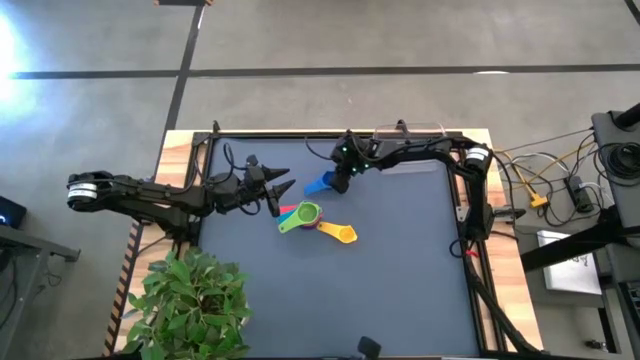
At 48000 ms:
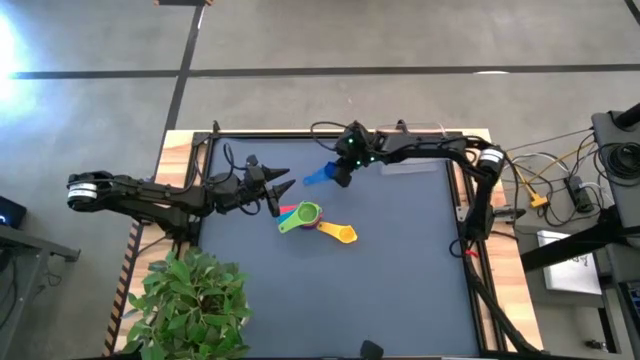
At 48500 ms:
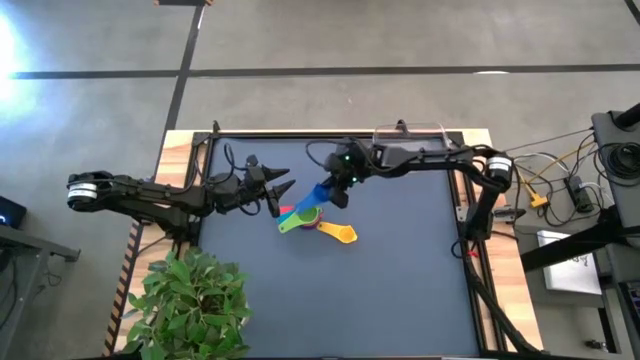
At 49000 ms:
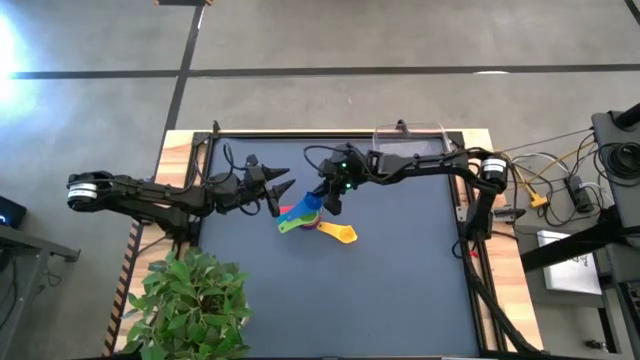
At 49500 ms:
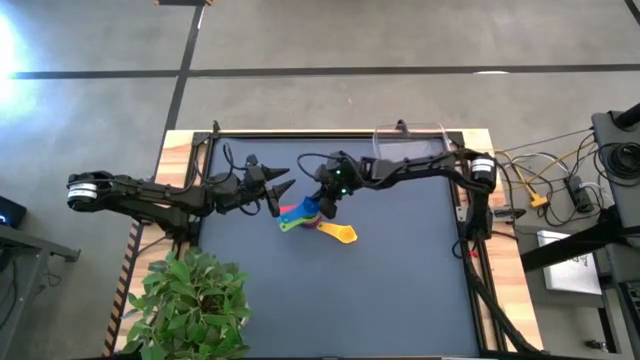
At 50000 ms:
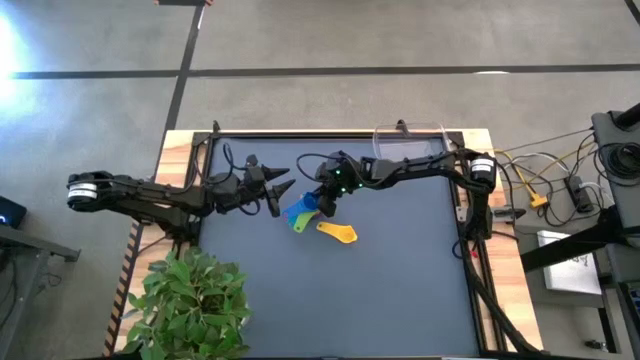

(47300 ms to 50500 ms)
Task: Nest measuring cups in basket
Stack the blue measuring cup on top of the green measuring cup

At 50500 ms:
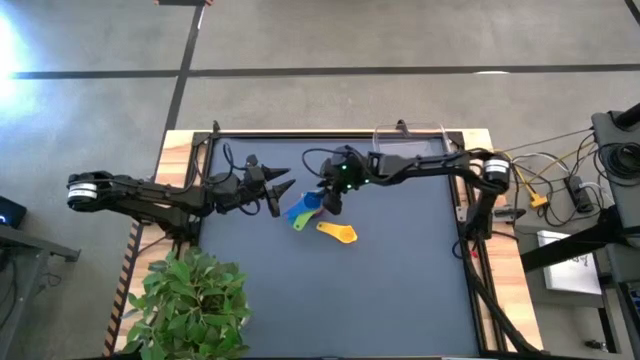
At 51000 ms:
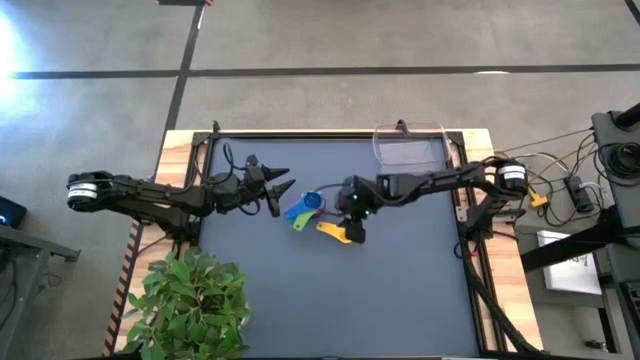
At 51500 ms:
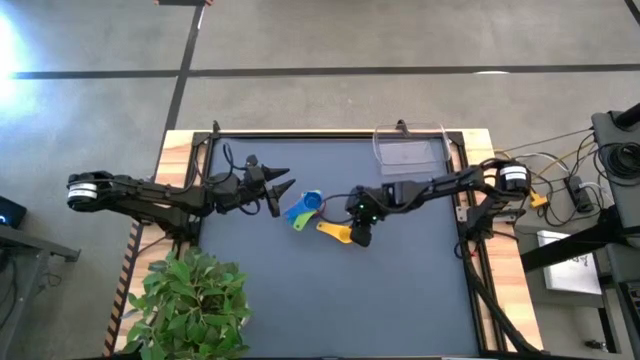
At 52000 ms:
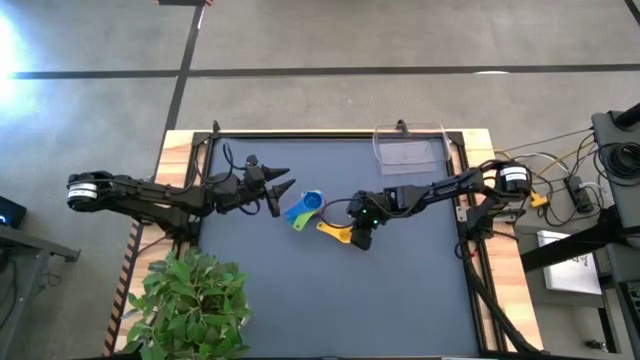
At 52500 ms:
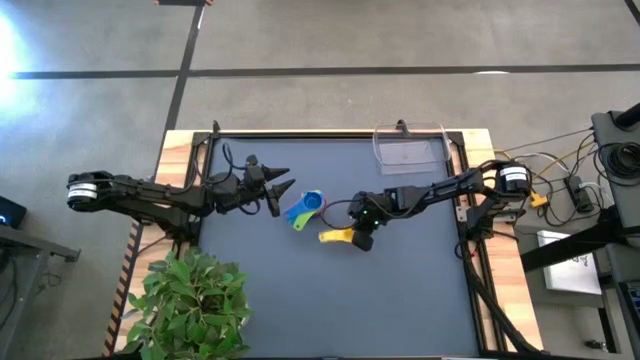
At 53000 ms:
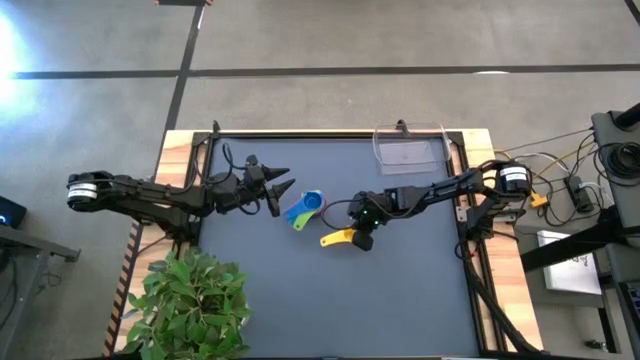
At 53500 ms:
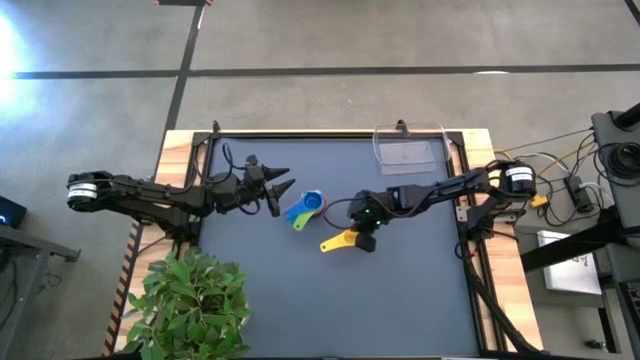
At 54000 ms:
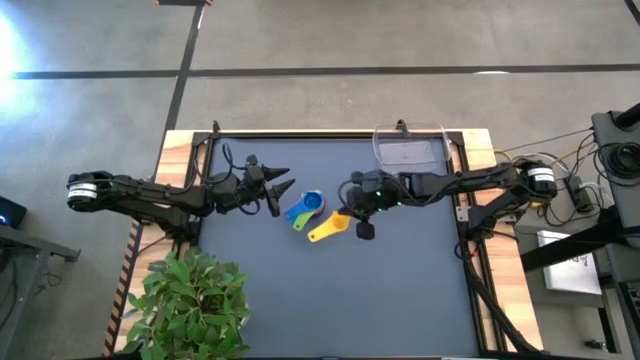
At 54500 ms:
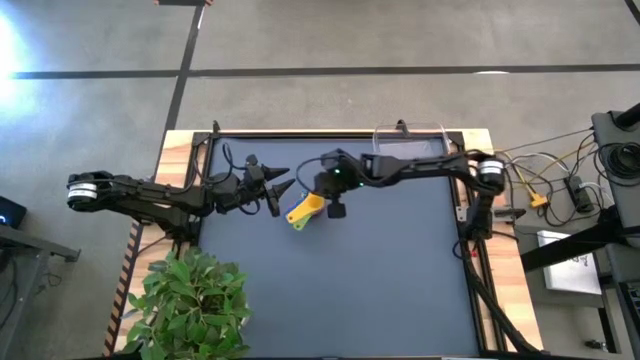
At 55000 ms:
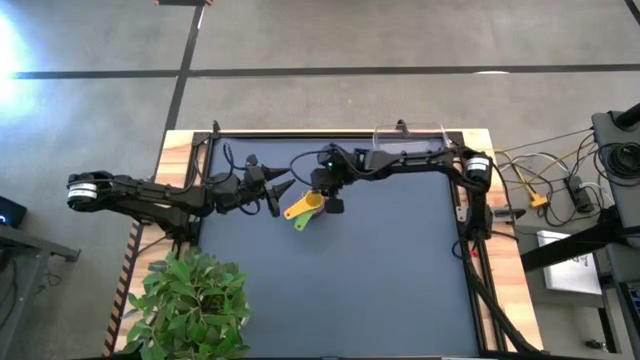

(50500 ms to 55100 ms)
Stack the yellow measuring cup on top of the blue measuring cup

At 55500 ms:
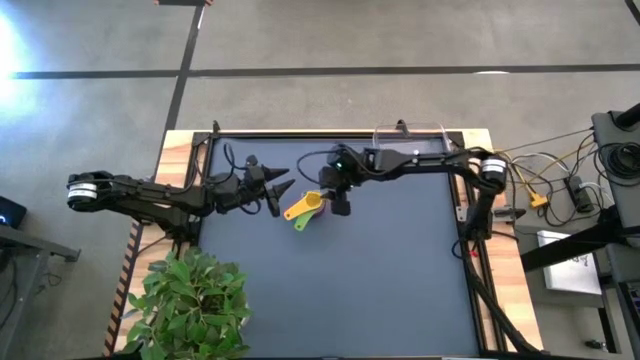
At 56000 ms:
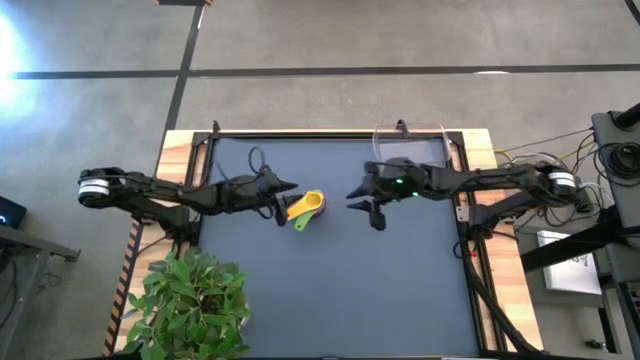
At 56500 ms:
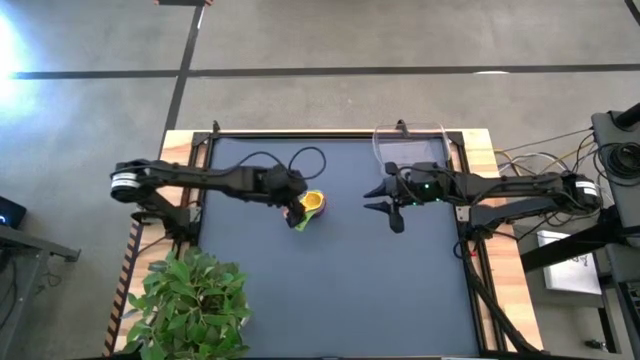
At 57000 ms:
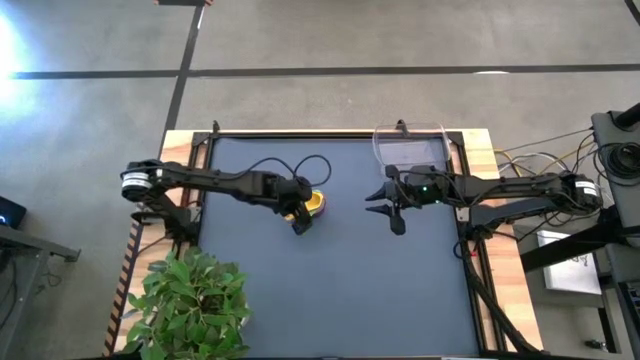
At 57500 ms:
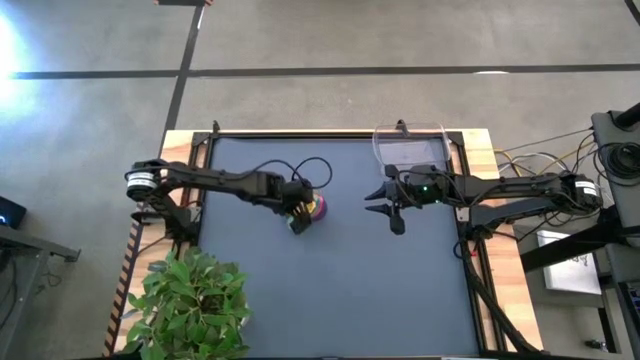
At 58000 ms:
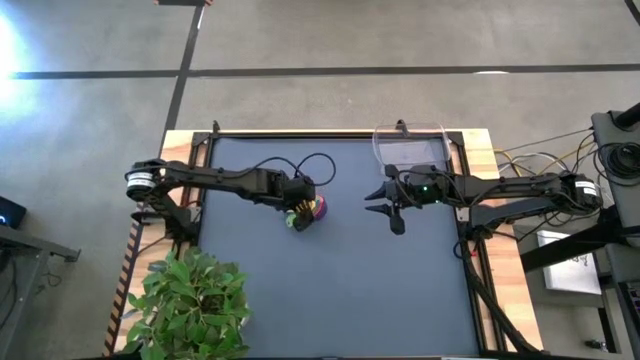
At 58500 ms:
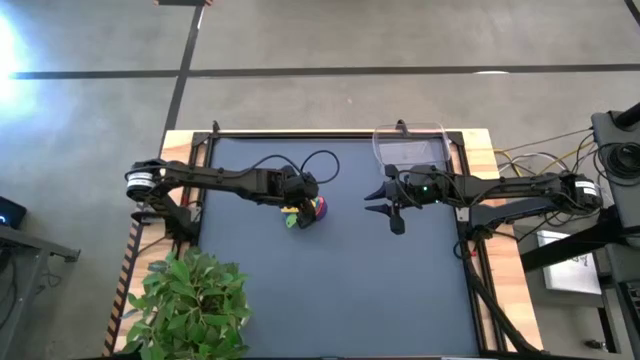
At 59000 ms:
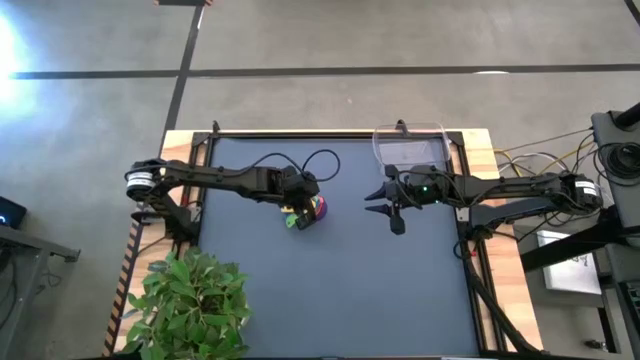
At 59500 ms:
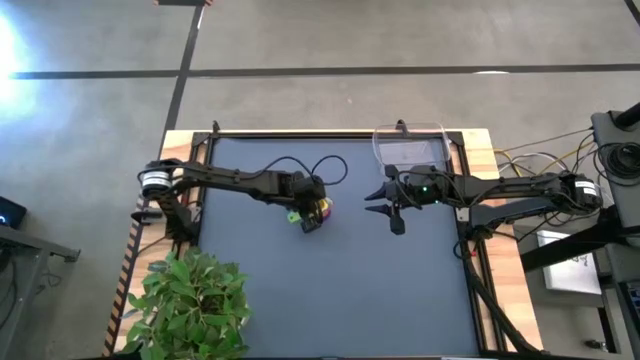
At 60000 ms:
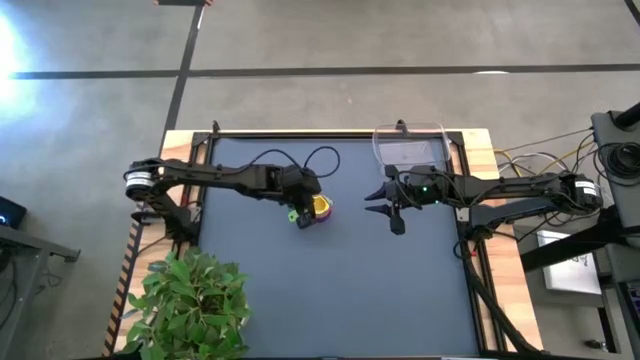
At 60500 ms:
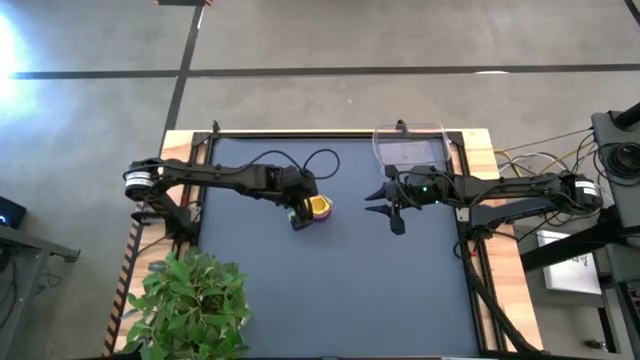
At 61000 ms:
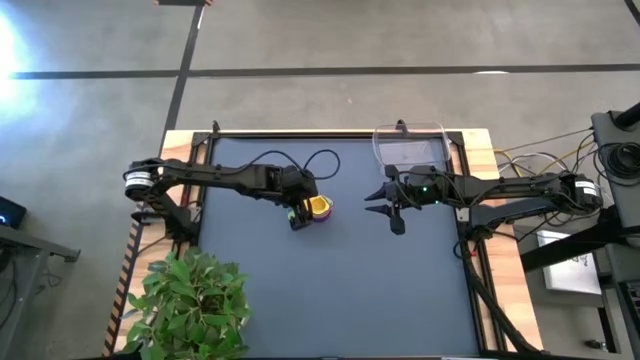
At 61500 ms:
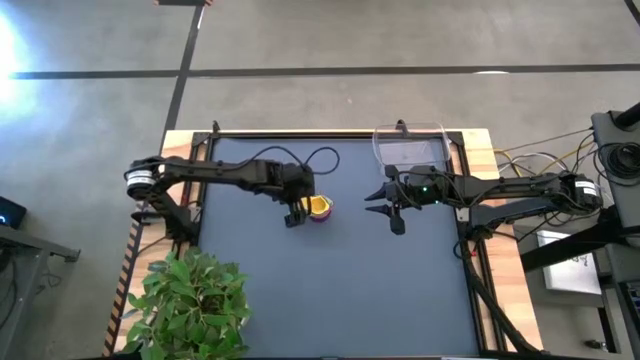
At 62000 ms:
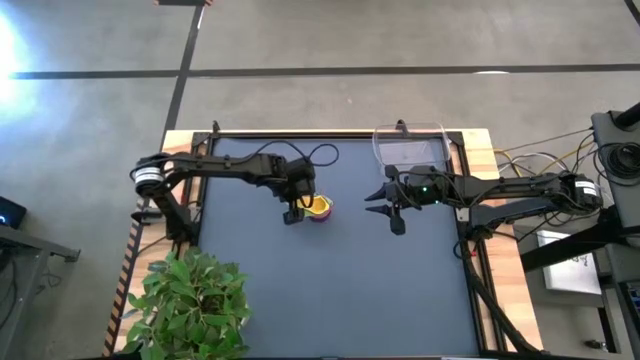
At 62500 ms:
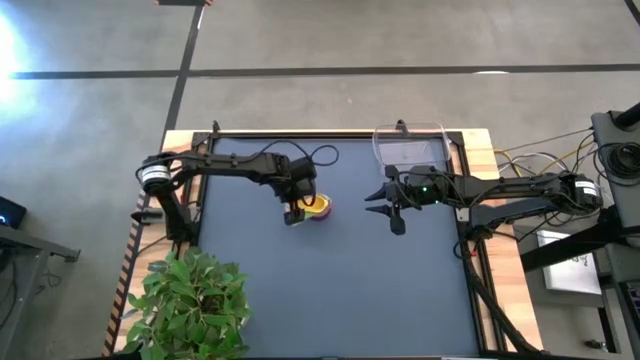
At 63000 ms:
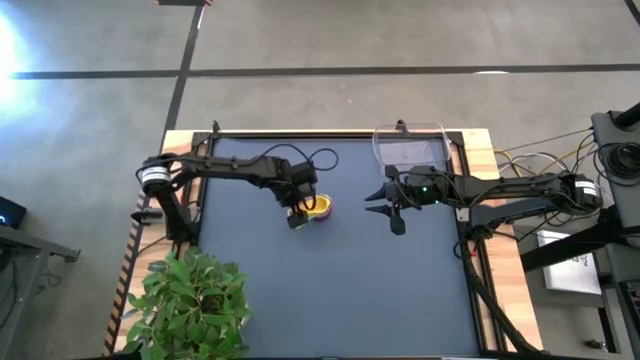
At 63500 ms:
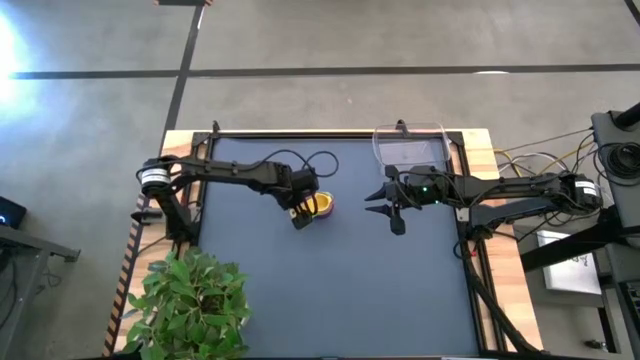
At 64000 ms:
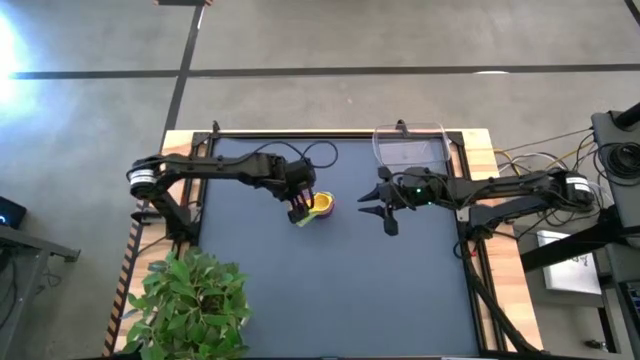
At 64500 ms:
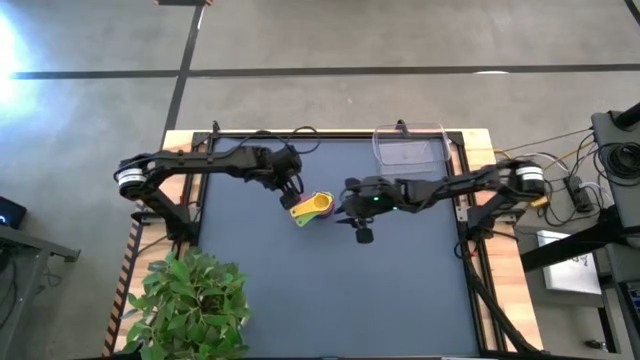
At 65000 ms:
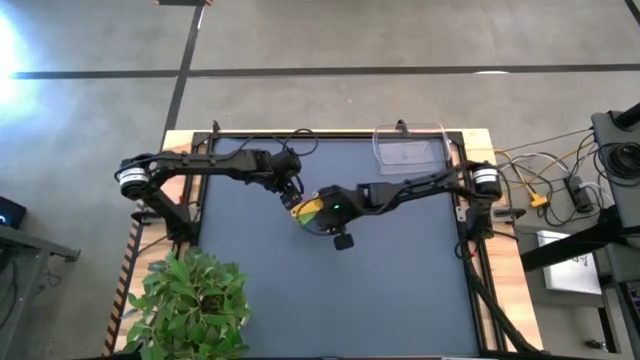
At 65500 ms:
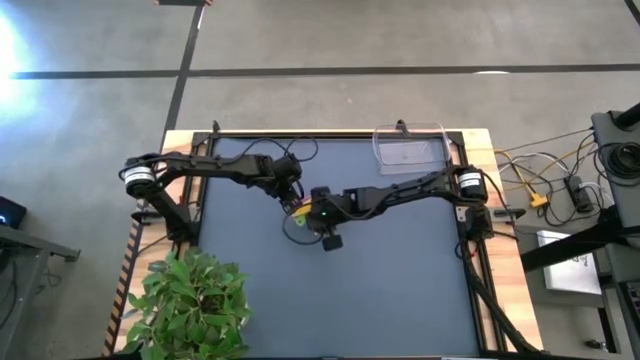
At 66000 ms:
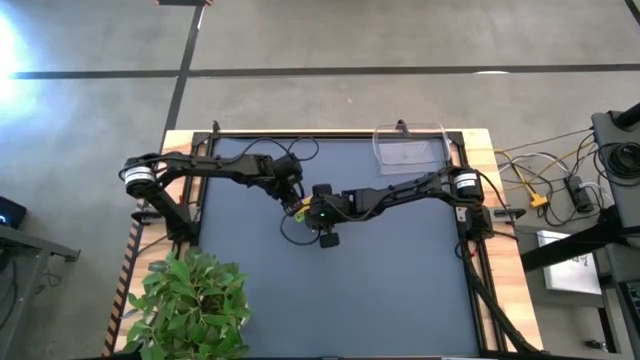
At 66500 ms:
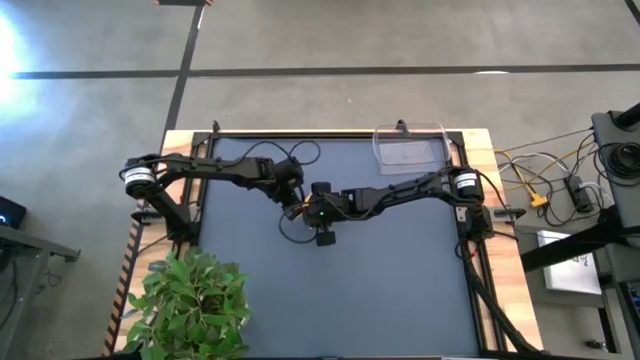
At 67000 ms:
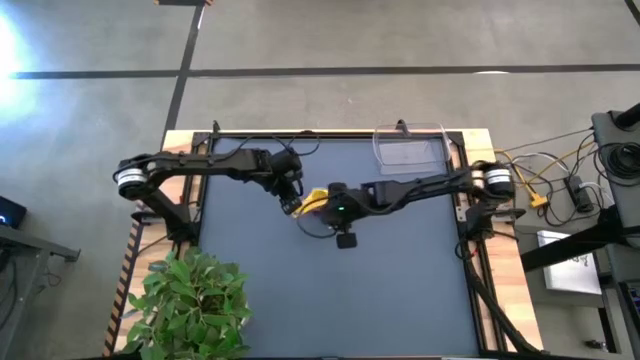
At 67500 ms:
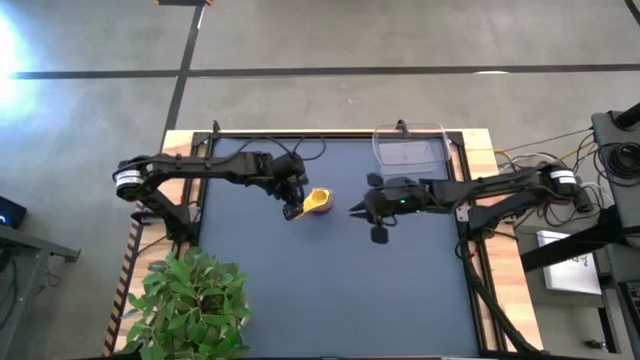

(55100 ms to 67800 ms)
Adjust the stacked measuring cups on the table

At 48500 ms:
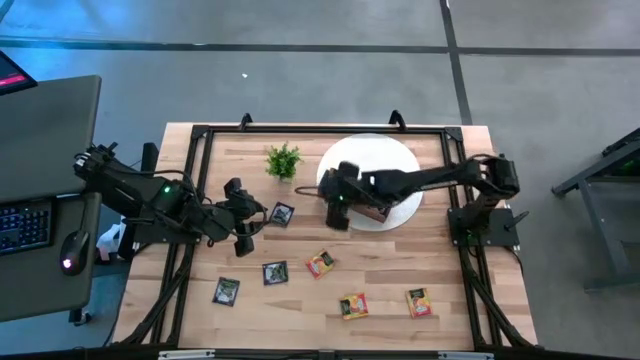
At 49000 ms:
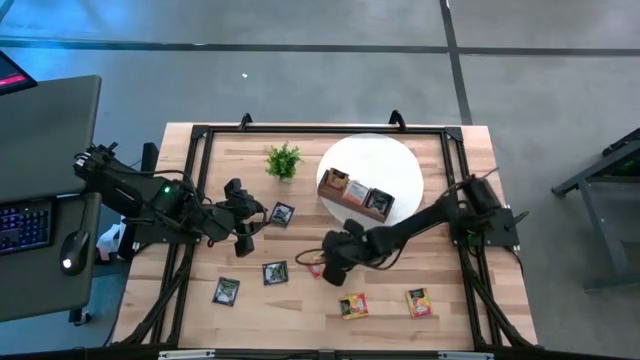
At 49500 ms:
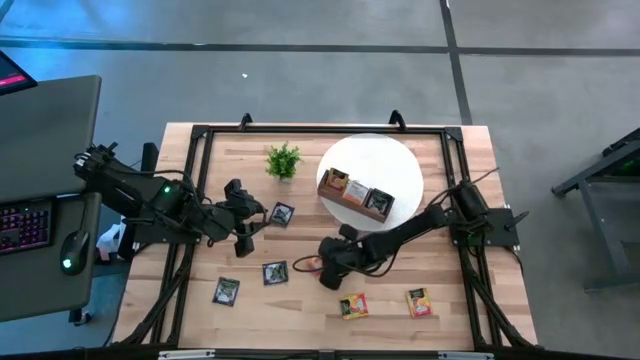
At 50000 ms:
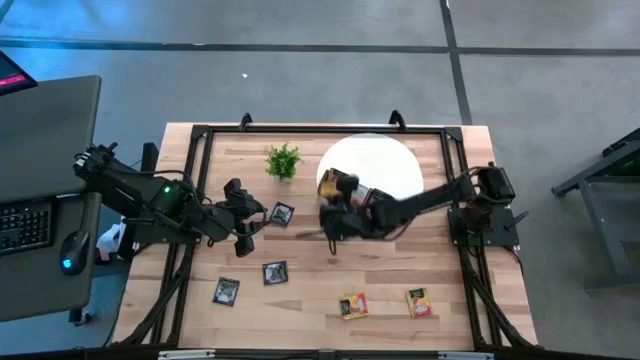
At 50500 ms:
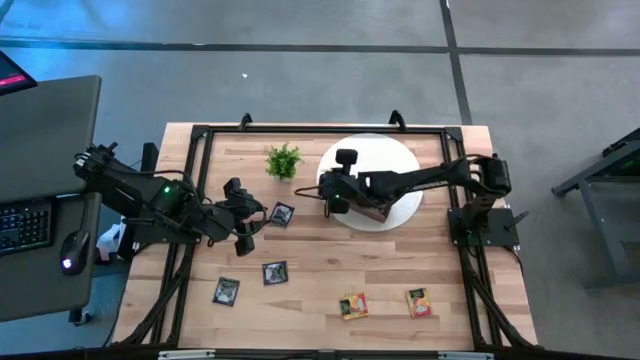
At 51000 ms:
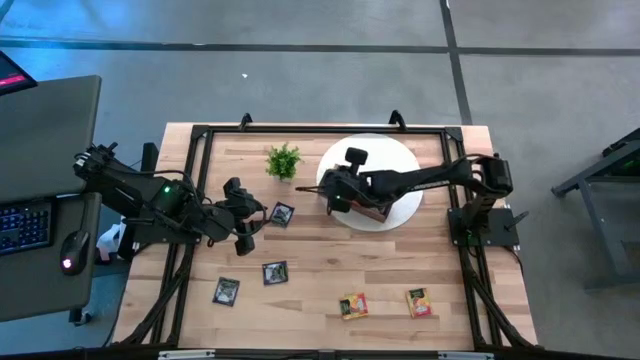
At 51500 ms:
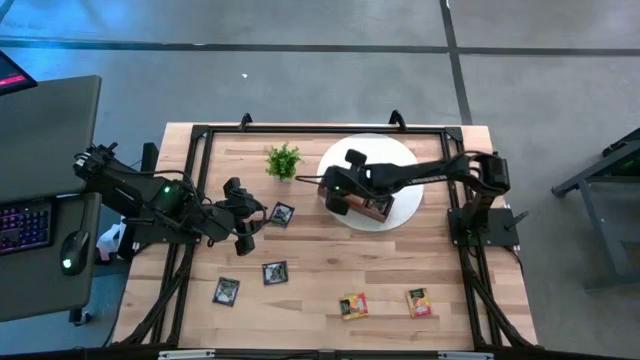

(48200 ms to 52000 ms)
Task: Pick & Place Tea
Put the yellow tea bag into the left compartment of the wooden organizer
